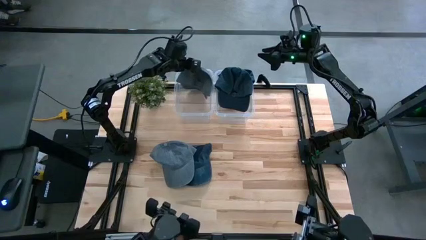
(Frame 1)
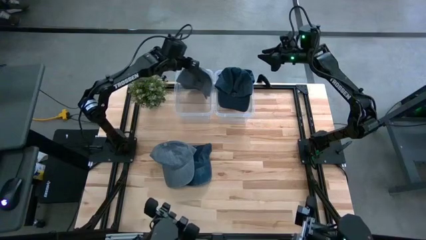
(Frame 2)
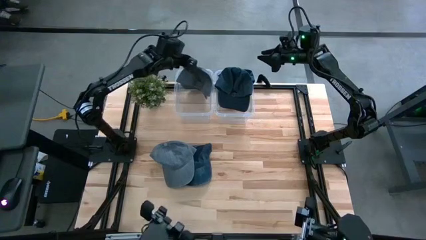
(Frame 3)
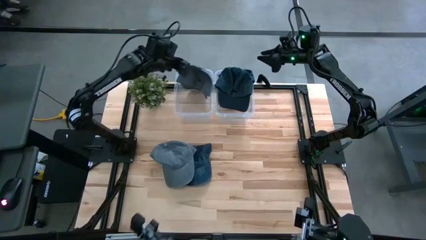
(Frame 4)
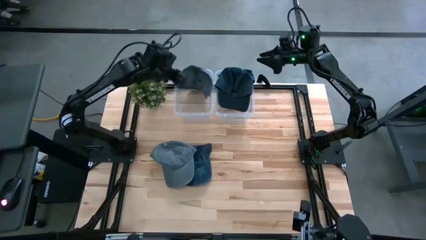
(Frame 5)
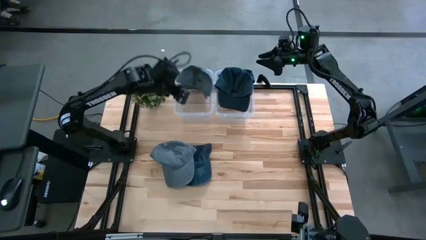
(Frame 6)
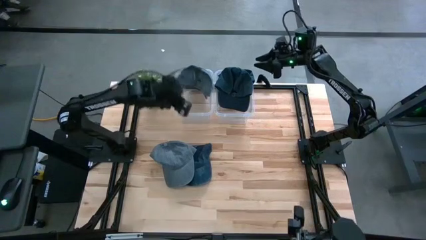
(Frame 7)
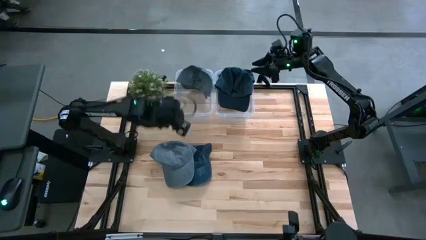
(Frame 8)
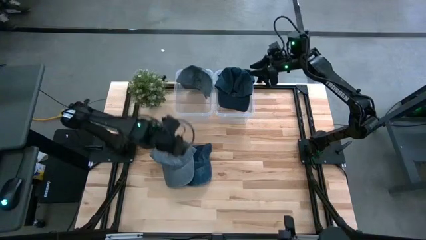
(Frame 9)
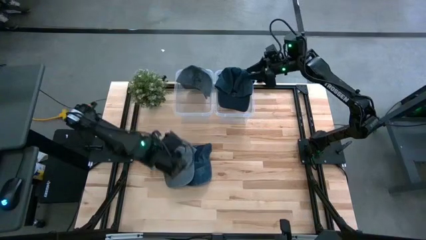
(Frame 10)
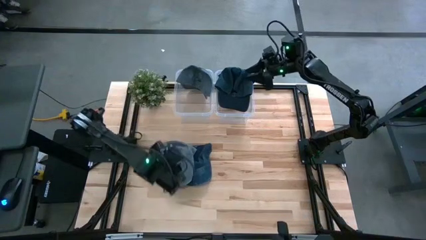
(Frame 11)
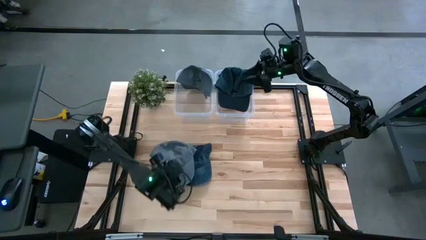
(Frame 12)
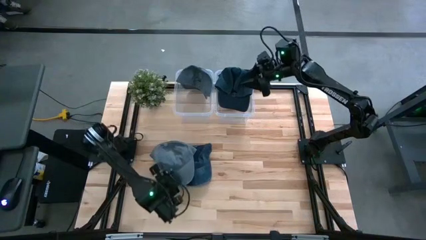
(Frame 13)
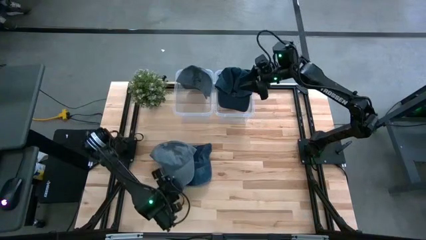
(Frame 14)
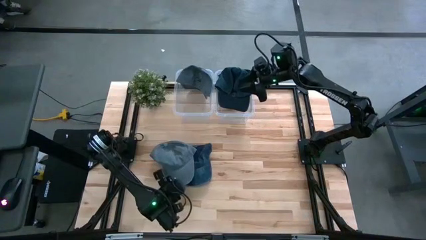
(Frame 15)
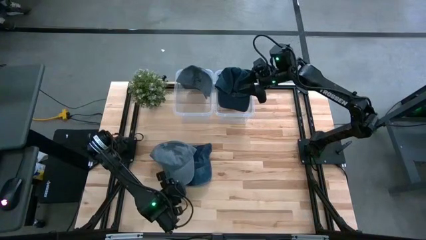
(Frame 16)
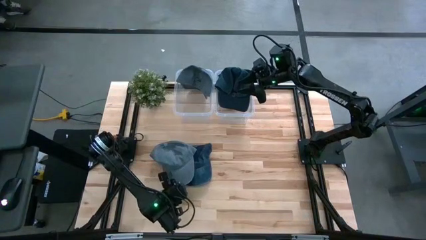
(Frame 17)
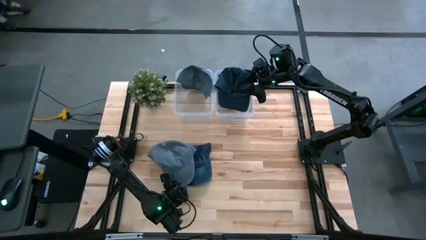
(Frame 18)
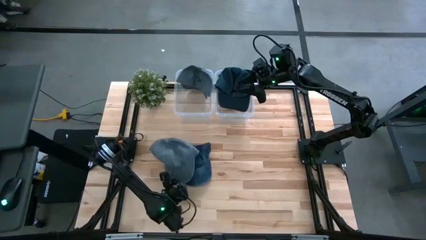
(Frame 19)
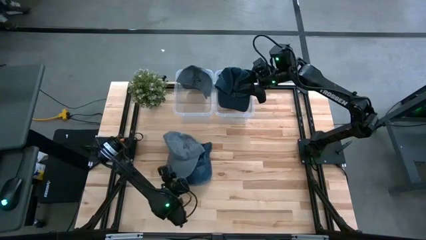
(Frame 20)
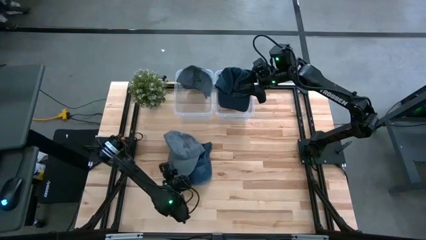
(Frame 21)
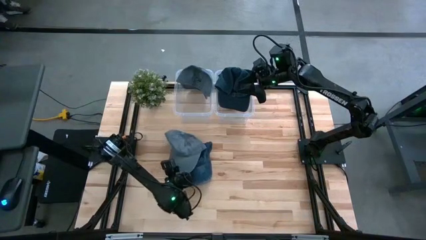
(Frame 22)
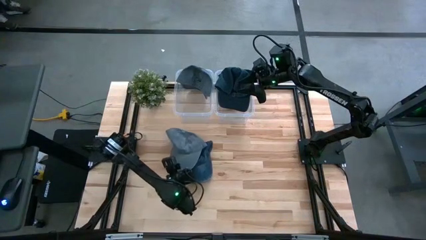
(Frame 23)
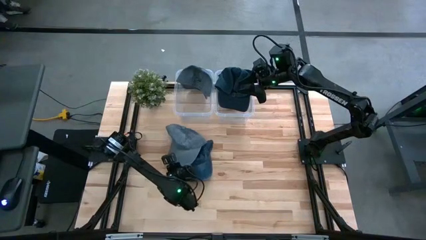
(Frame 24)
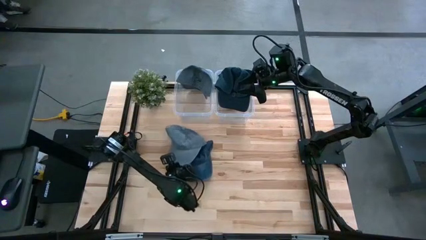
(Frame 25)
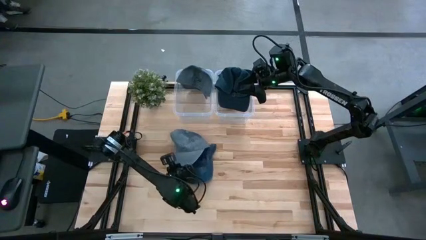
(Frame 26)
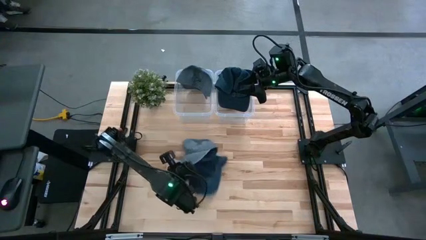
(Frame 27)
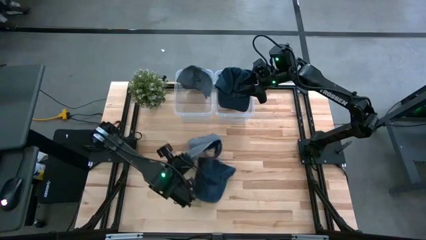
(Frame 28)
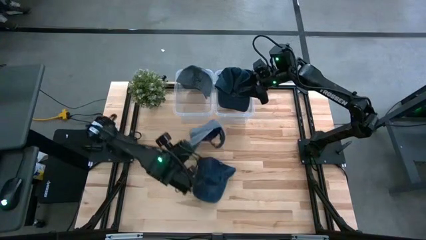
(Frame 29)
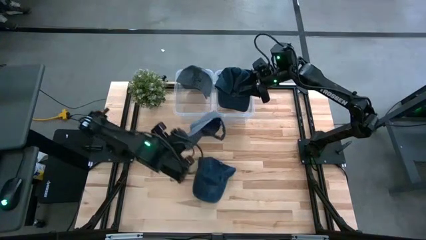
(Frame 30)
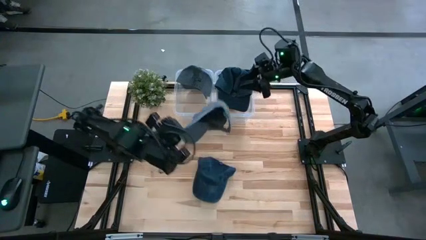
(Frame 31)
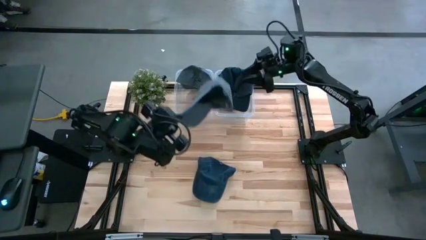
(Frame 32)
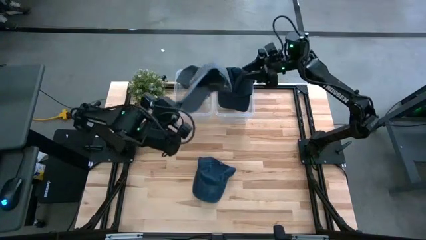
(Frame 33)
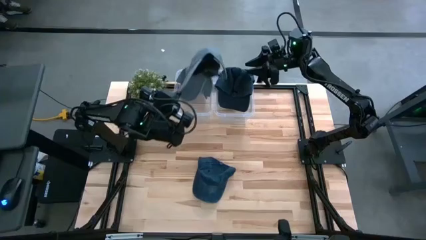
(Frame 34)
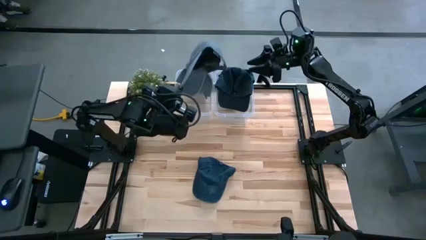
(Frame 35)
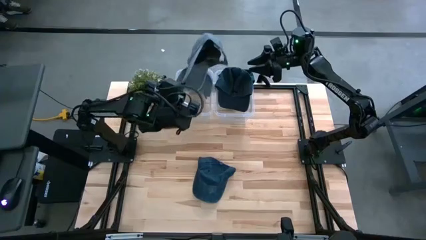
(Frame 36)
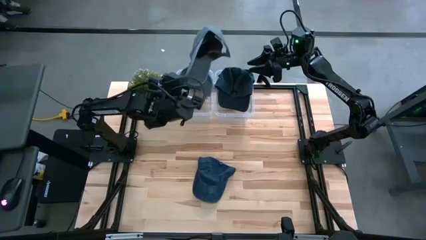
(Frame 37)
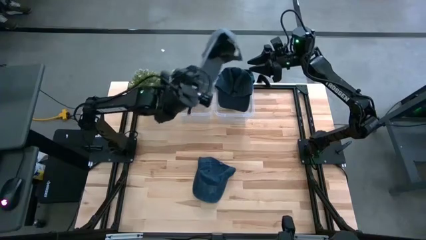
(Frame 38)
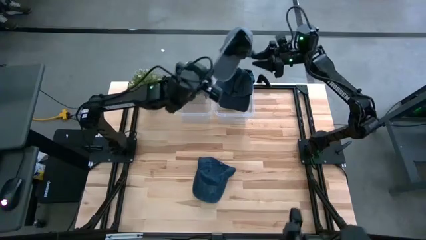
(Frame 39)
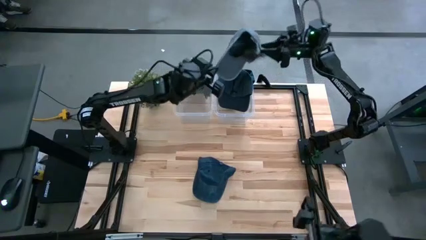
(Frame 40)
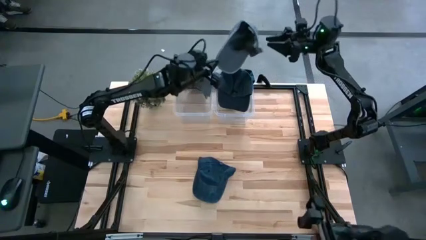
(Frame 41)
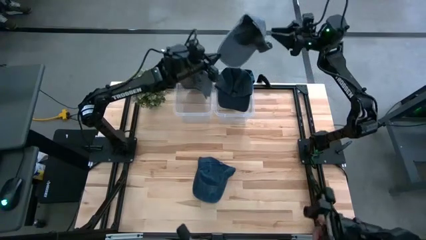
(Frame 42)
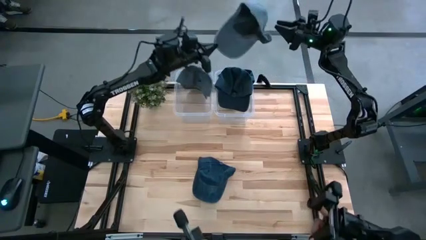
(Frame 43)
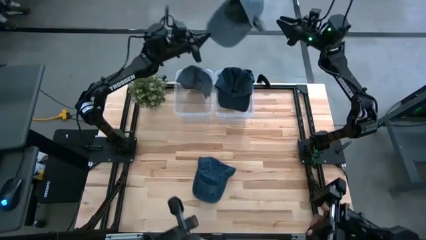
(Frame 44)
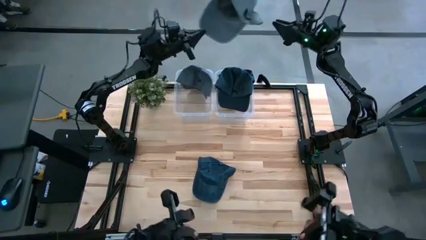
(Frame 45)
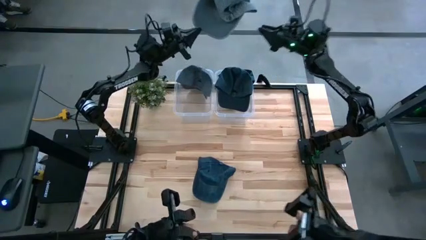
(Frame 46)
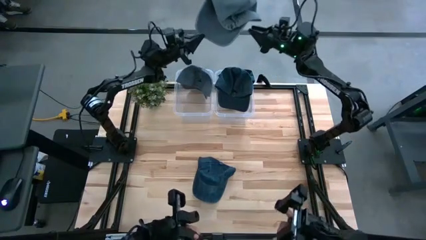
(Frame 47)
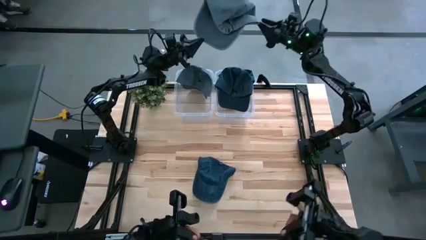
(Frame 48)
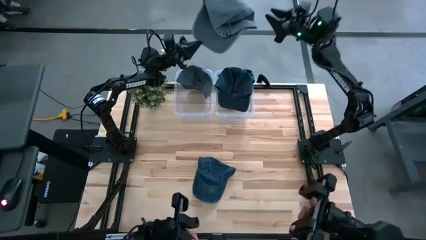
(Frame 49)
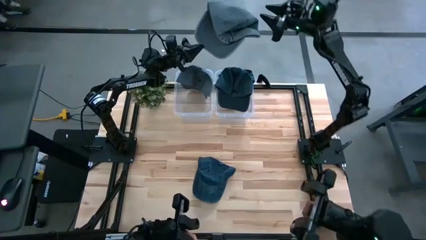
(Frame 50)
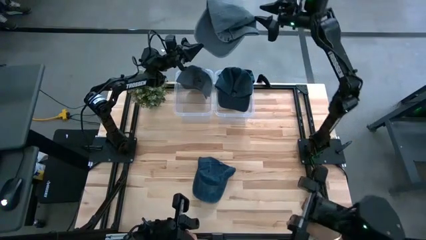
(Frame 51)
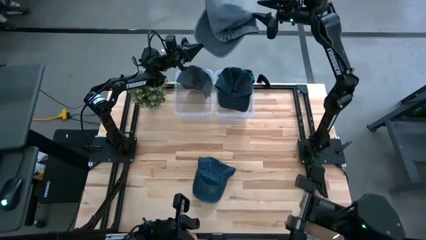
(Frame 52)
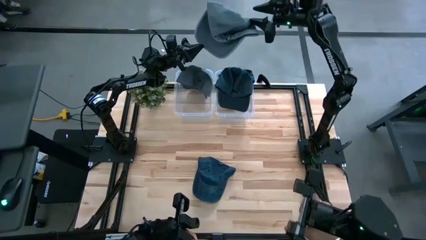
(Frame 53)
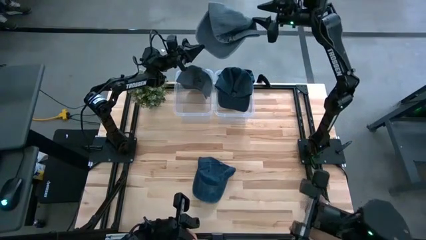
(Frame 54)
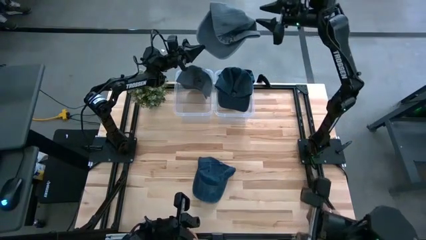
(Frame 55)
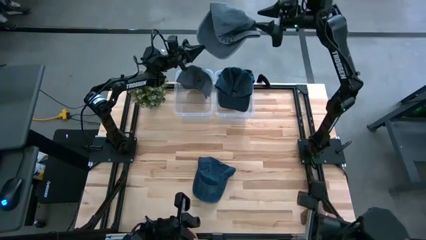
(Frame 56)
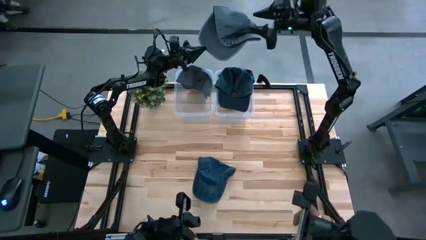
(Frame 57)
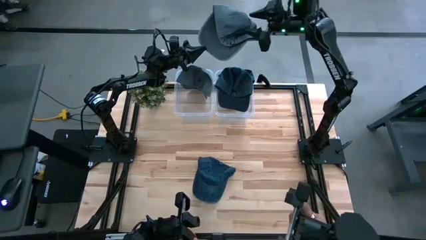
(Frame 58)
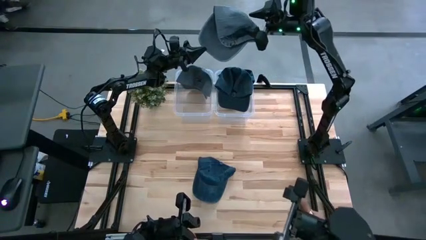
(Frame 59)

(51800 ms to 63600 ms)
Task: Pick & Place hat
Put the gray cap into the left transparent bin

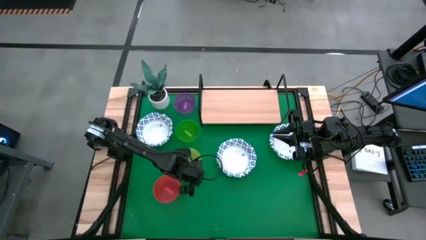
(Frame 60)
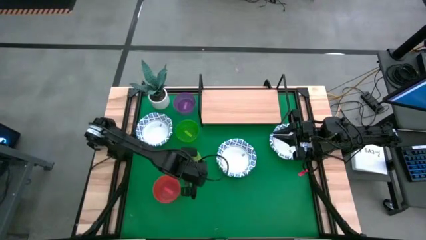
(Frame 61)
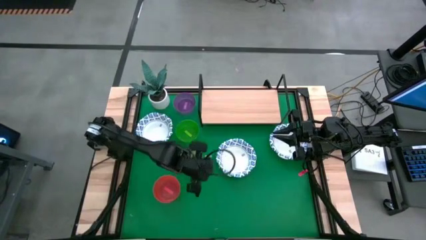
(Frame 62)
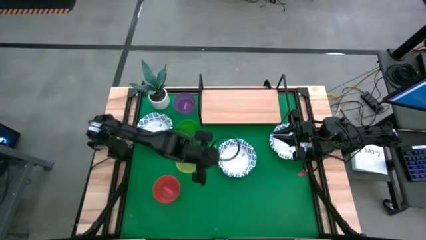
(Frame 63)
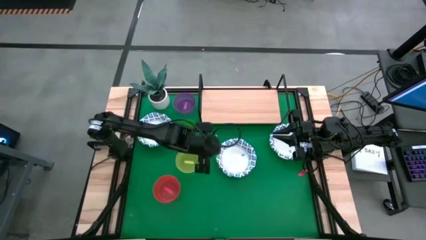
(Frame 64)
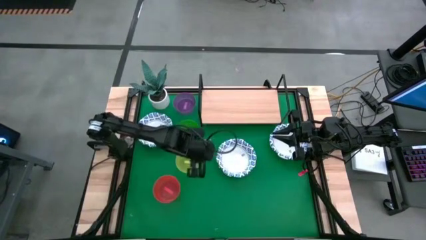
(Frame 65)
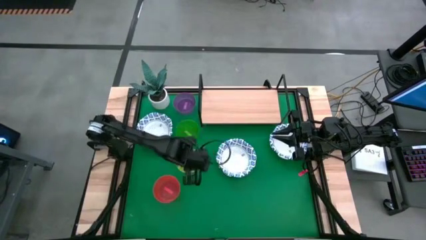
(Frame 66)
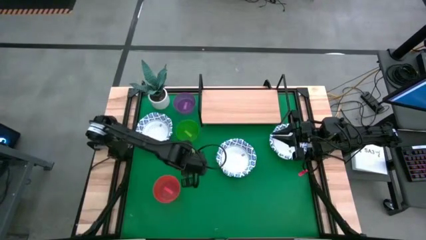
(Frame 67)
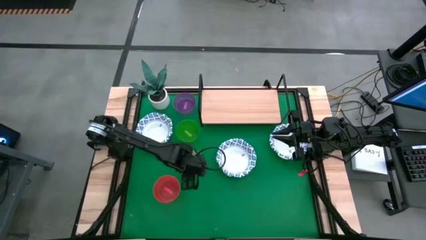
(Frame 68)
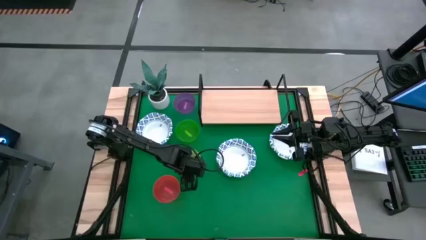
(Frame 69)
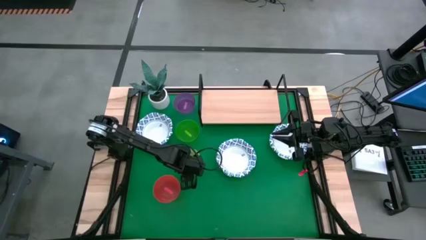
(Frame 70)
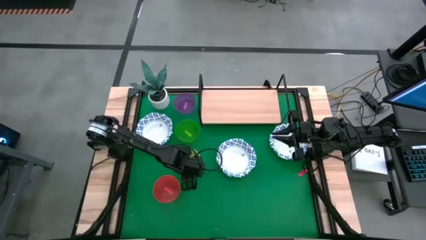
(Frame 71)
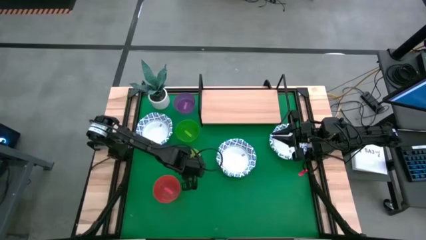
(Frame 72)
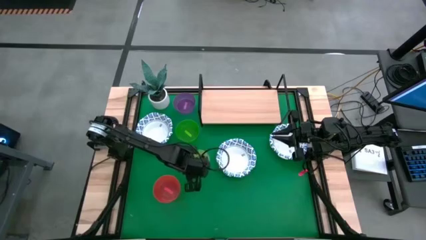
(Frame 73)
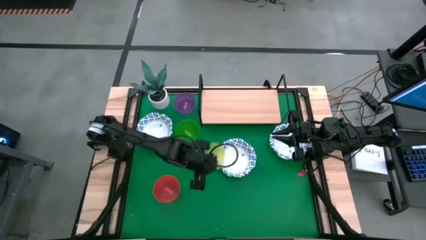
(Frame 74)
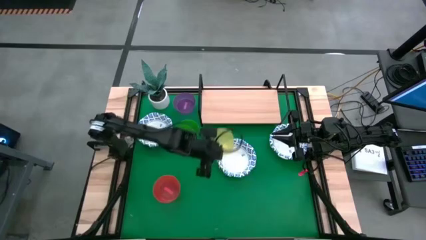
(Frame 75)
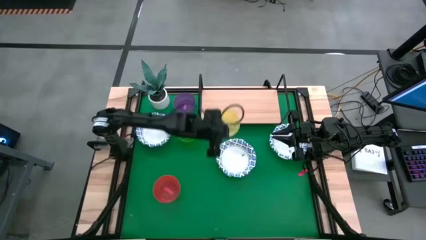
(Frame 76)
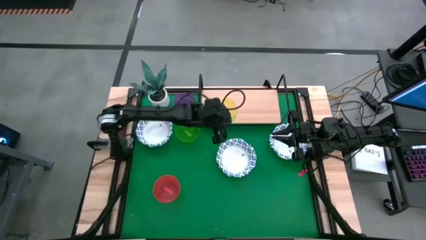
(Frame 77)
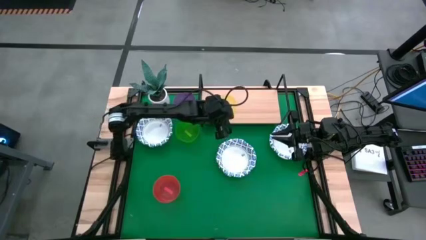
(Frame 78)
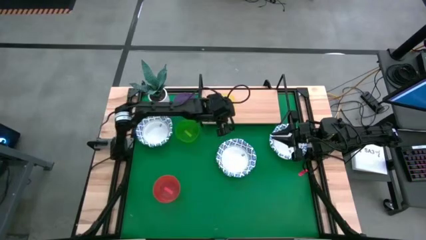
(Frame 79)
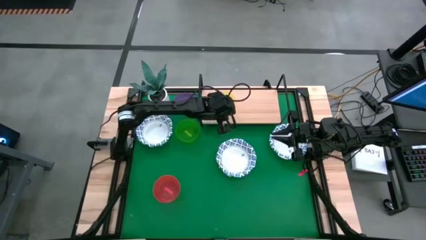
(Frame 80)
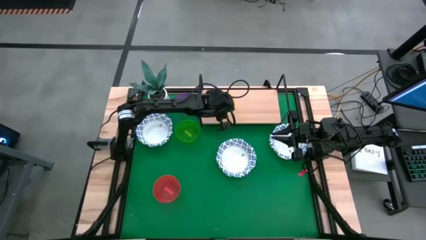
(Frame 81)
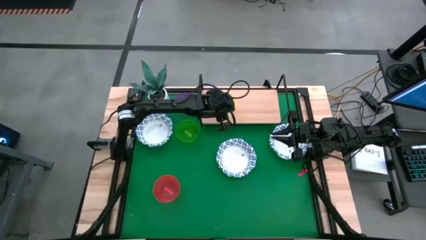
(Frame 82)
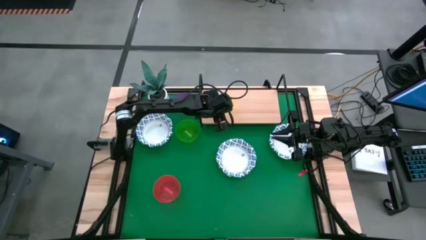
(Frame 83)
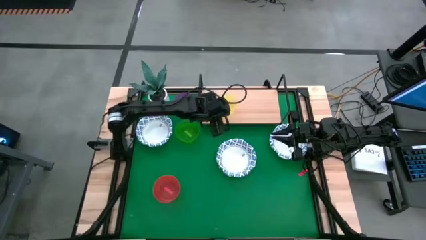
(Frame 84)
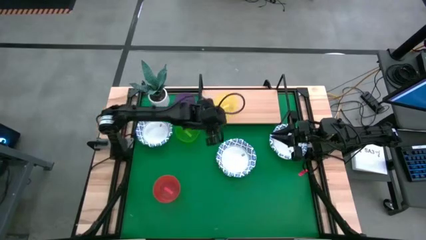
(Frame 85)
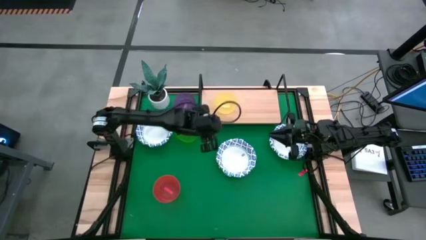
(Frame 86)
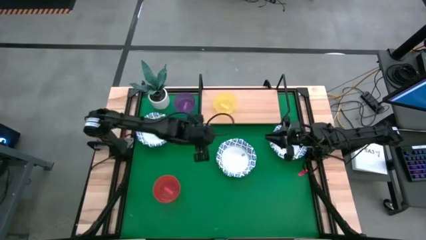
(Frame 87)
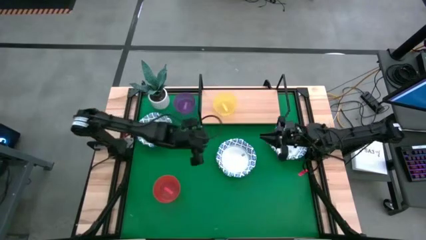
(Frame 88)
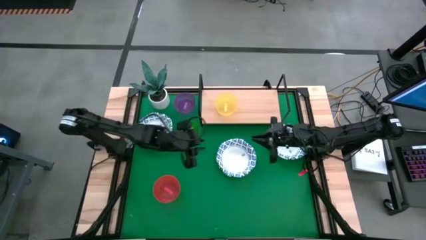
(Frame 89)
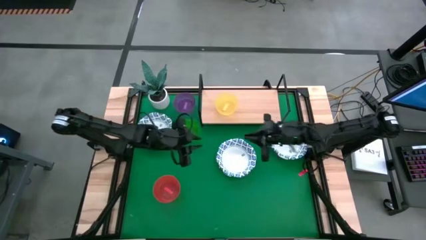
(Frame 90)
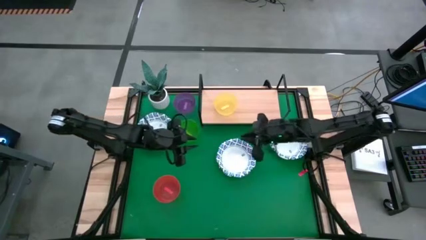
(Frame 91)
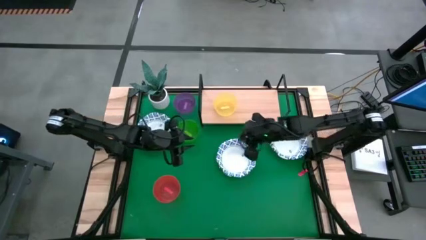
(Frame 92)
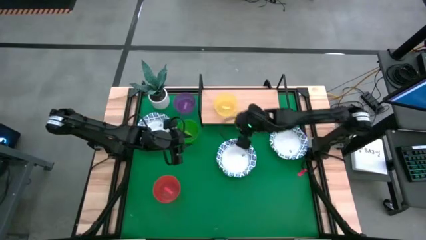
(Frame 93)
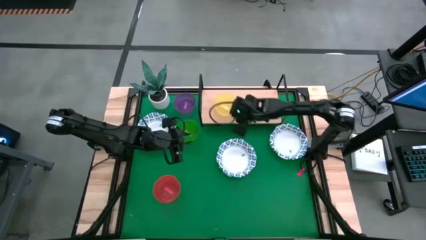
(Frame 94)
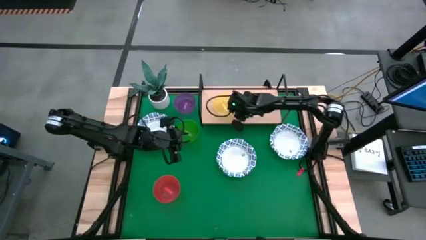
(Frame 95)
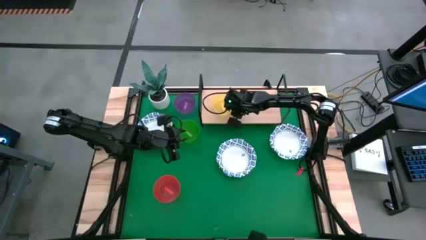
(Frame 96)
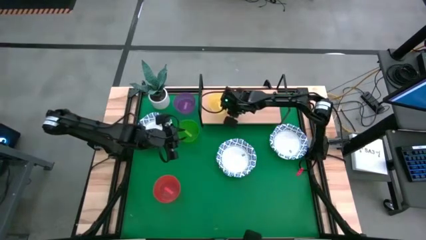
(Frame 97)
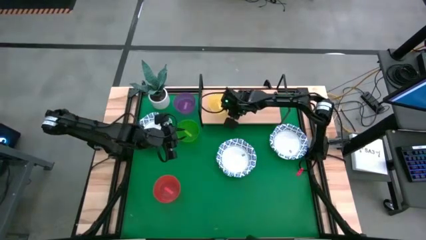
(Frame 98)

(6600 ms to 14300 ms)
Task: Place and stack bowls onto a shelf
Put the yellow bowl on the shelf
